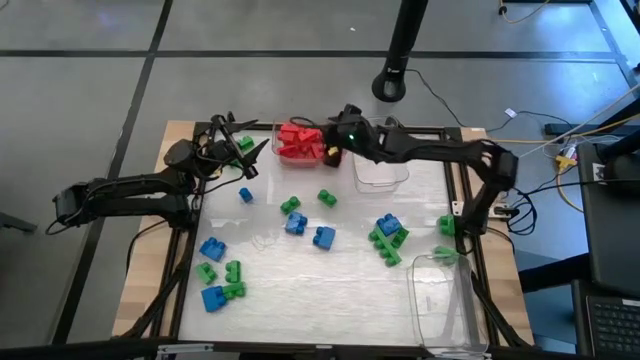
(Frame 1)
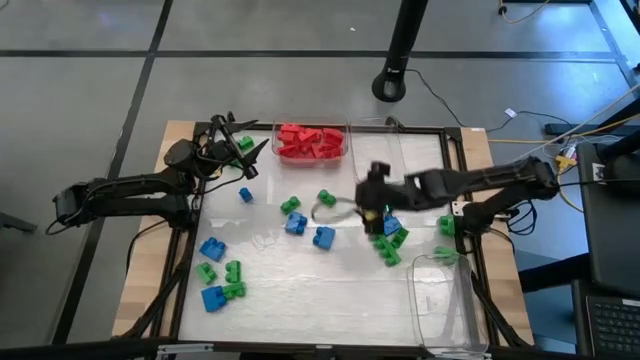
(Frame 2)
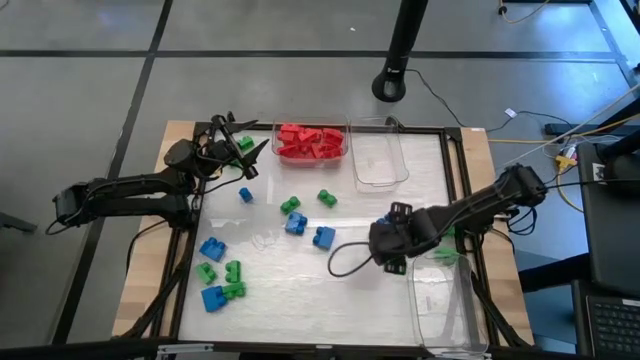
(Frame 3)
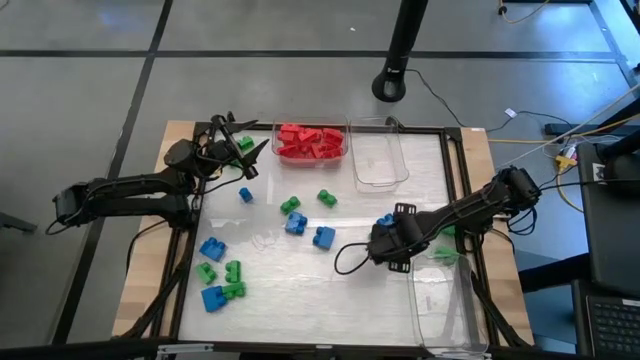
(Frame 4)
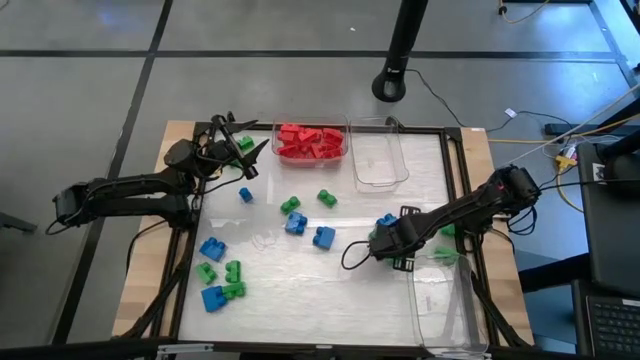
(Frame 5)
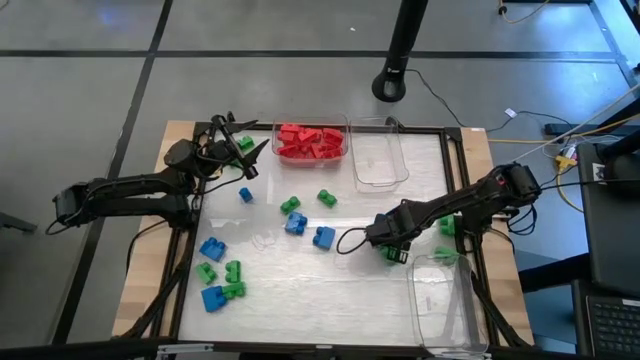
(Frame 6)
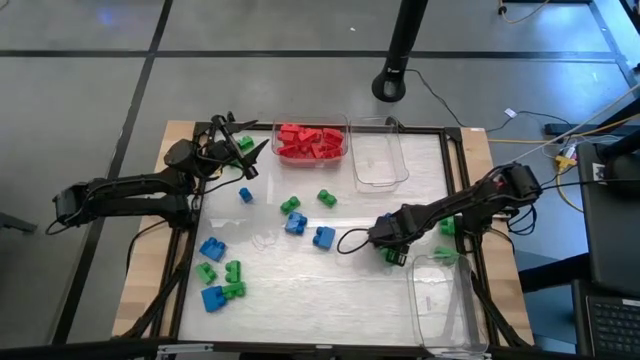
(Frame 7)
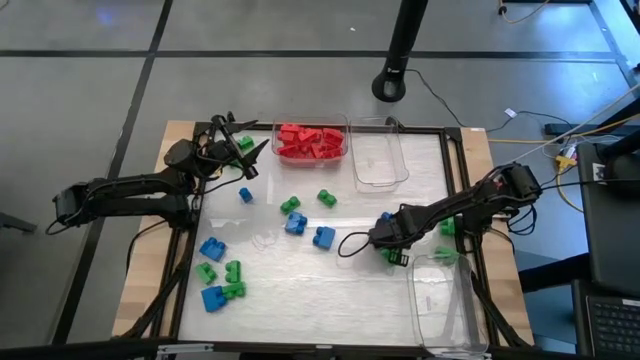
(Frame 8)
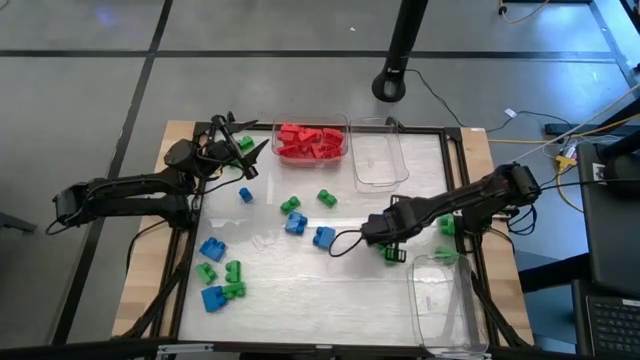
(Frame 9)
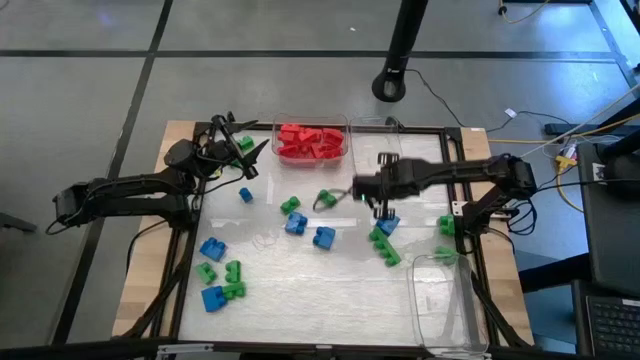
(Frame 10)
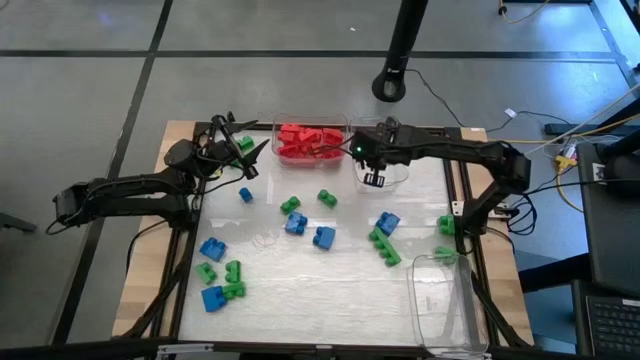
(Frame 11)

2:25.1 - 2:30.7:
Task: Sort blocks
Put the green game piece into the top right transparent bin

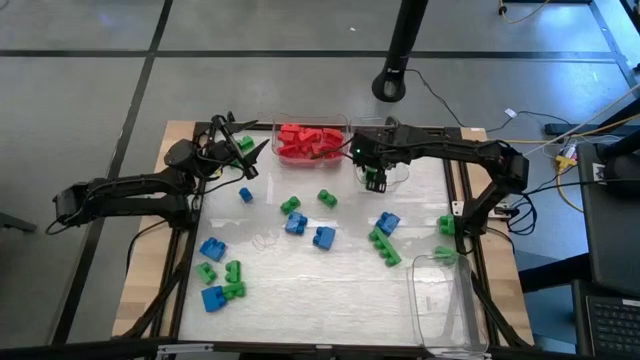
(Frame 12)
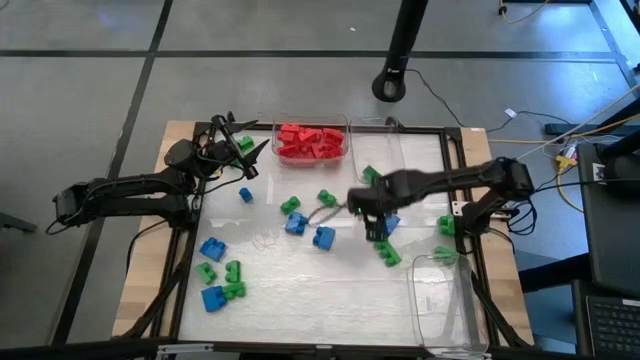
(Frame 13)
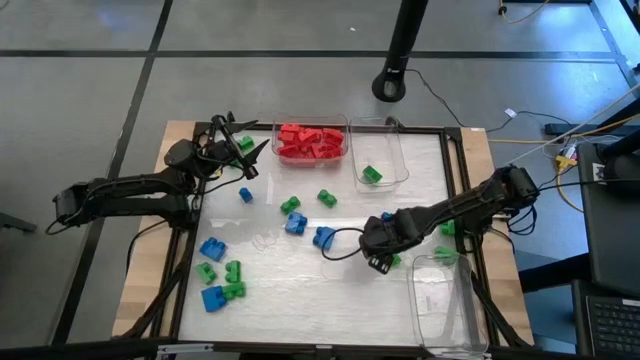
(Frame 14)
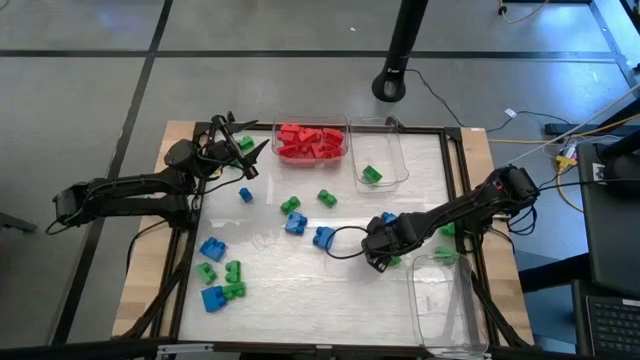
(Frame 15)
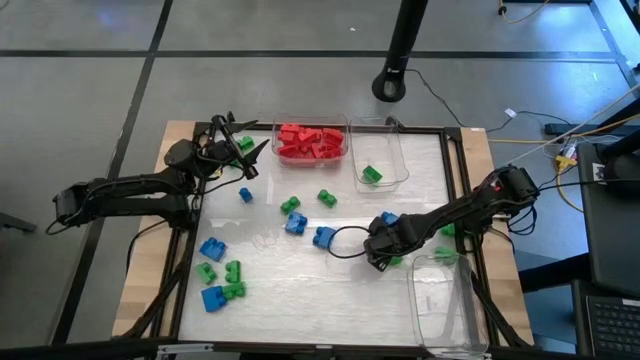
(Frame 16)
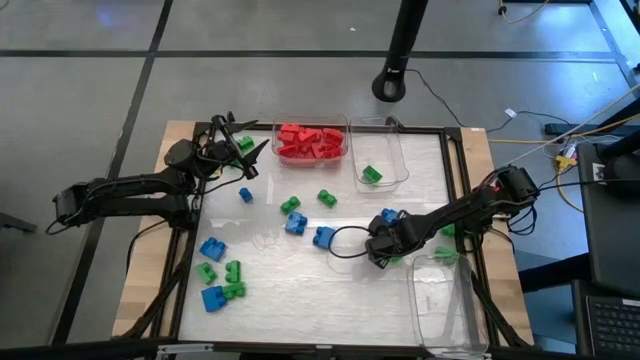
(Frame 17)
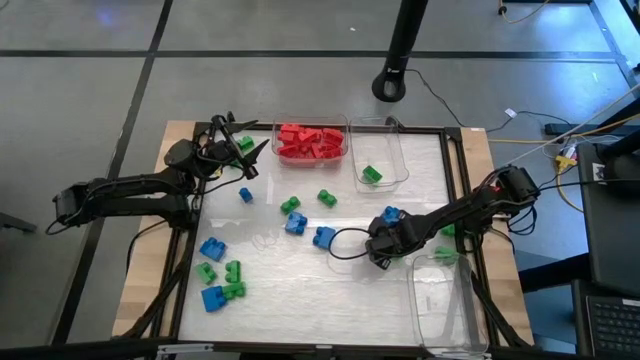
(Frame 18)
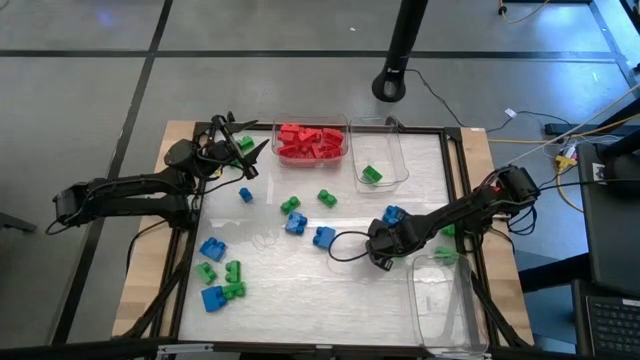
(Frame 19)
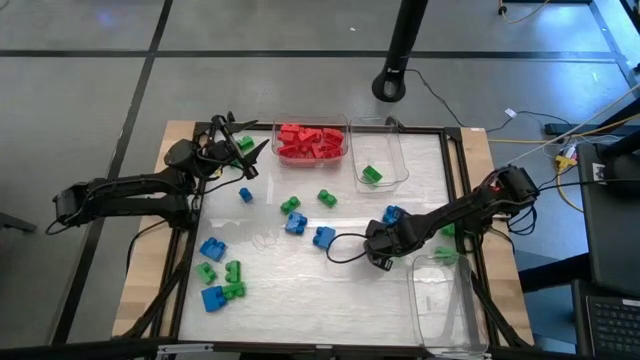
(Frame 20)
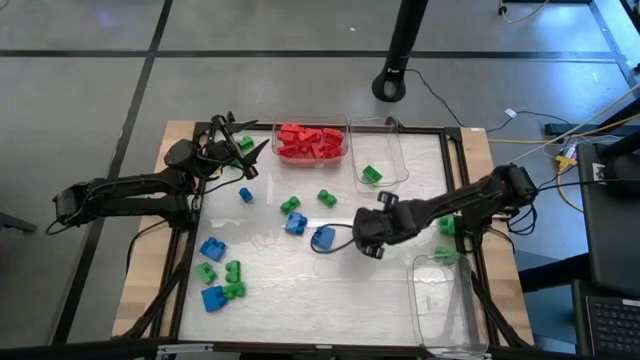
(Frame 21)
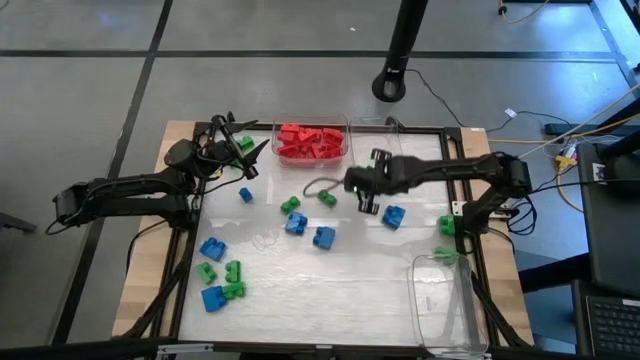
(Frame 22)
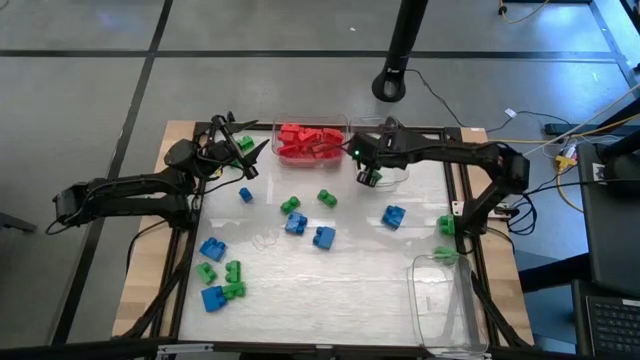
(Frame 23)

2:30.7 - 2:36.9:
Put the green game piece into the top right transparent bin

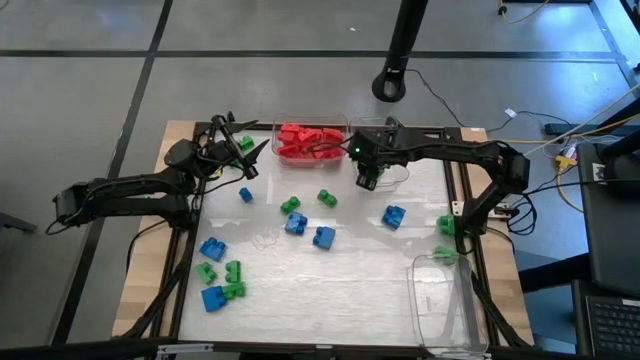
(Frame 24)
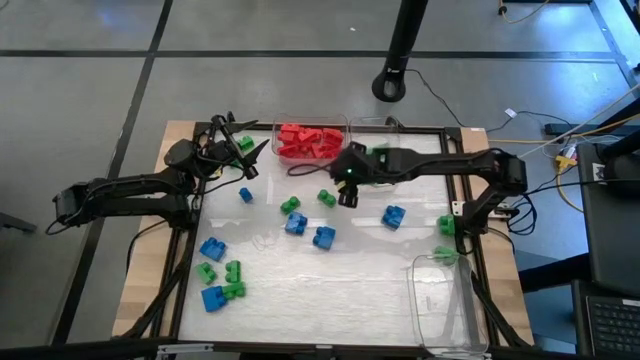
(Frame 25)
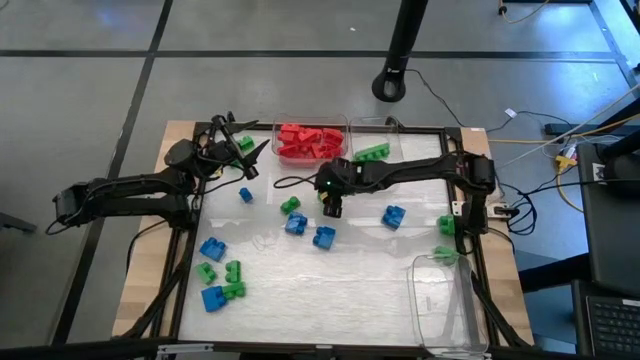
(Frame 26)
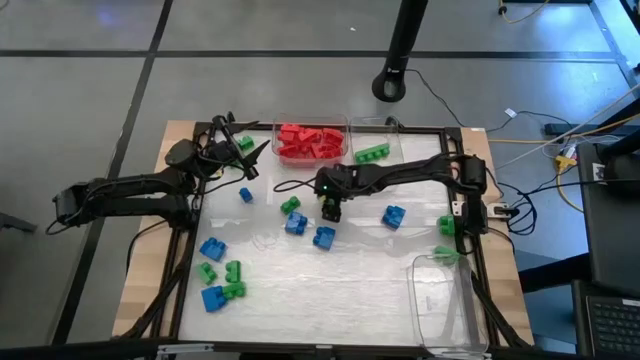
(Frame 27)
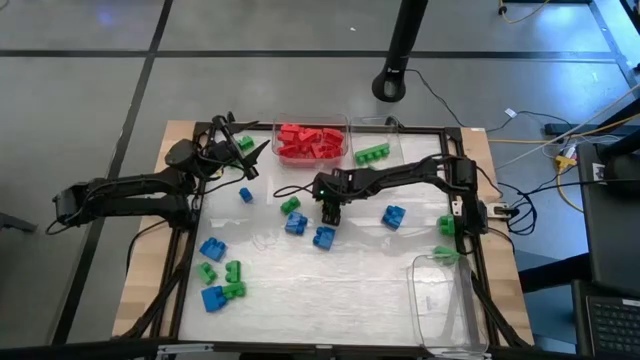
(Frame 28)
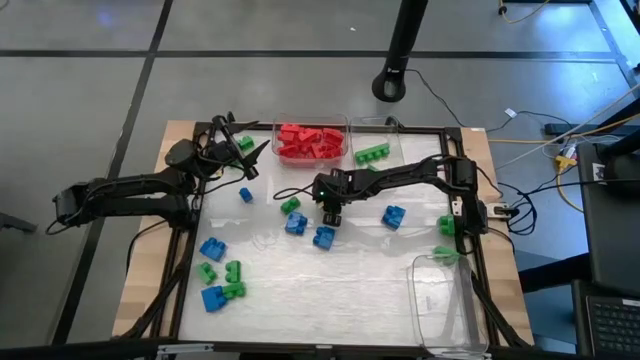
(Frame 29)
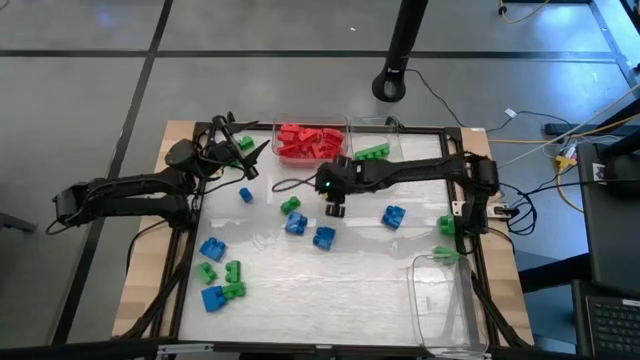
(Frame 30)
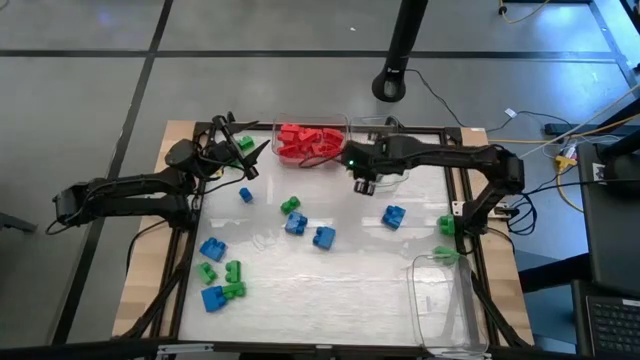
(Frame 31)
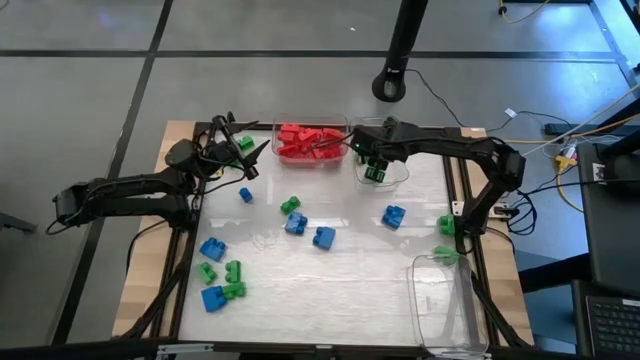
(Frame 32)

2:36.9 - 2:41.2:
Put the green game piece into the top right transparent bin

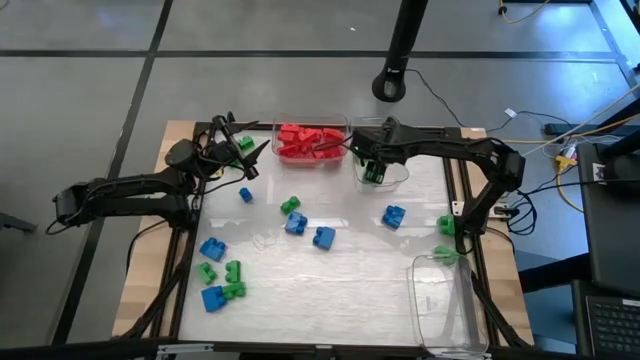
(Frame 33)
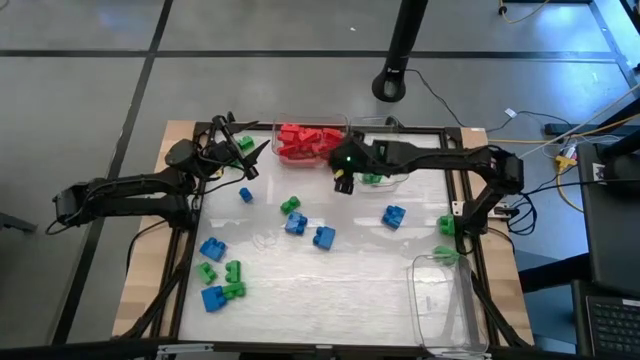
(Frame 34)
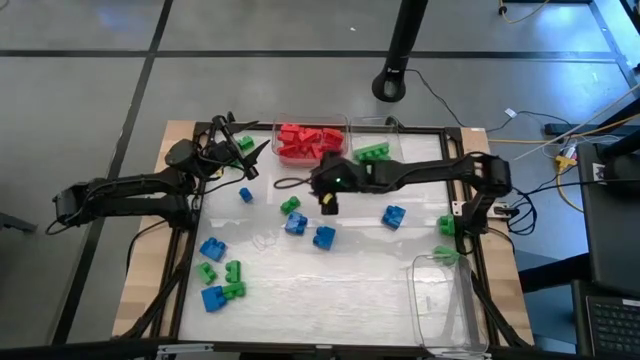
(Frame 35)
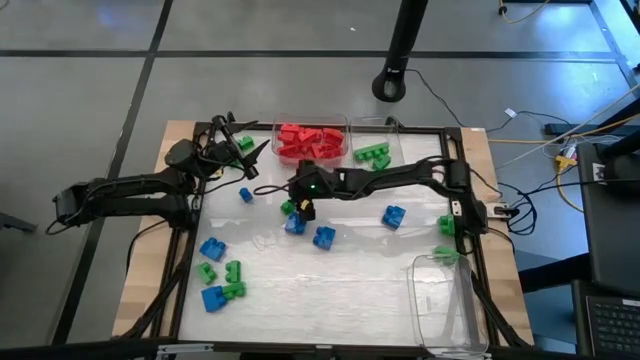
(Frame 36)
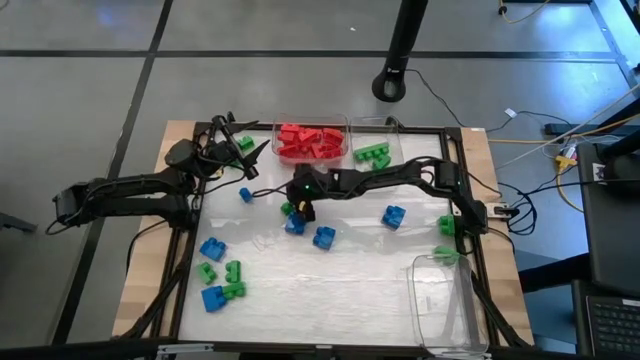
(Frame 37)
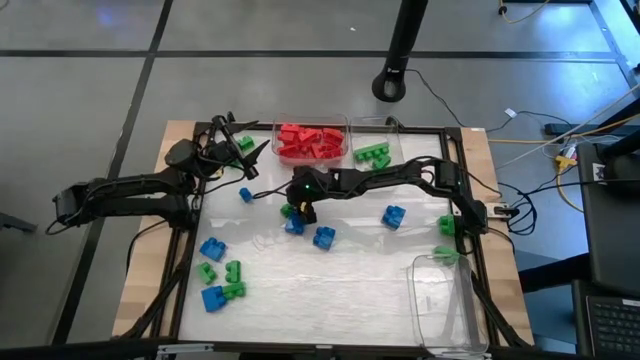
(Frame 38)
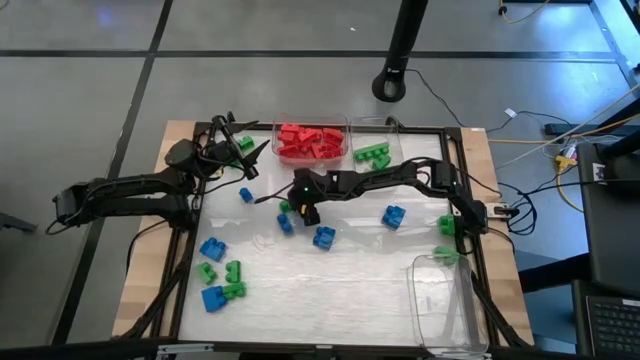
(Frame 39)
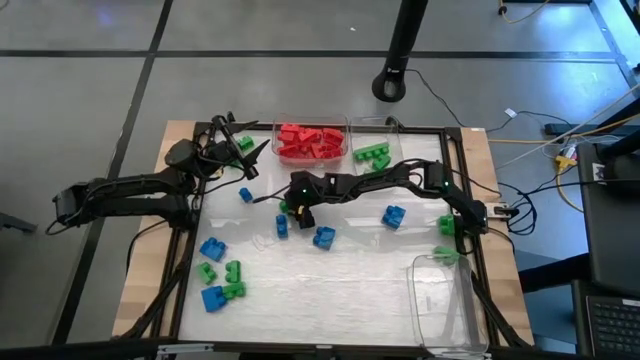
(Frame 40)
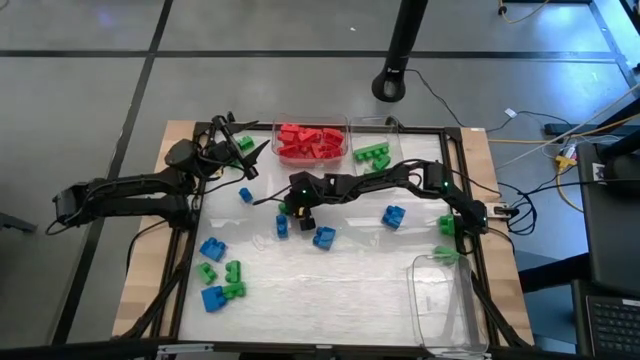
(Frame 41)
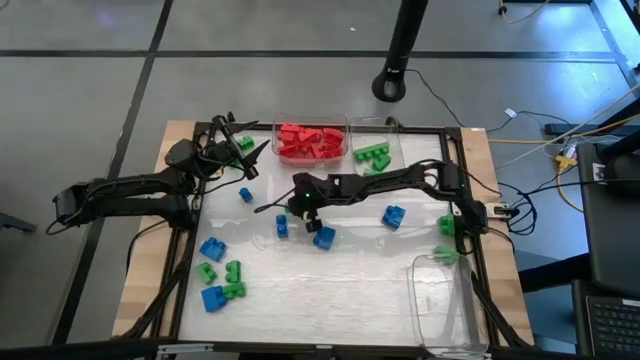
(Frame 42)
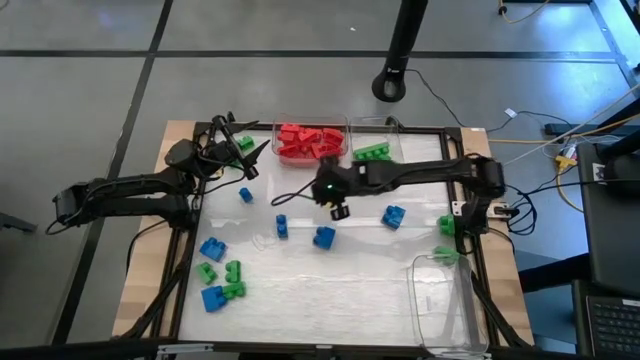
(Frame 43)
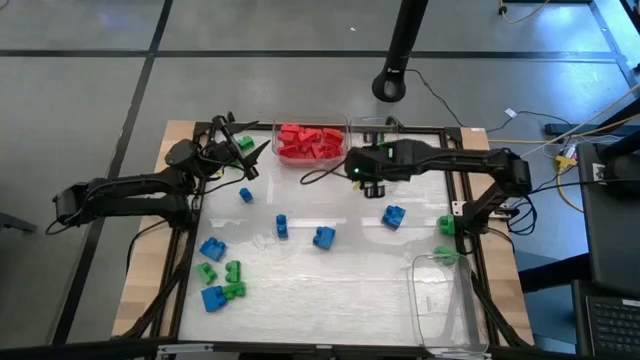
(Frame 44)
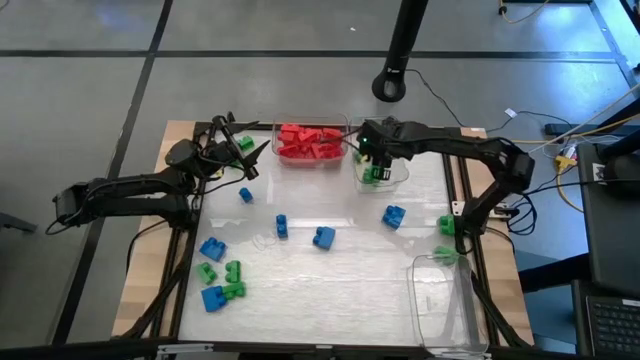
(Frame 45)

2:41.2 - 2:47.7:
Put the green game piece into the top right transparent bin
